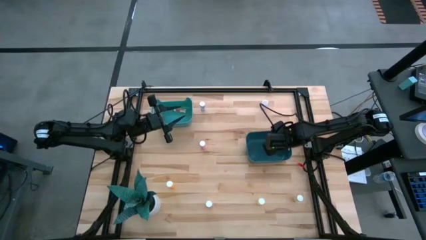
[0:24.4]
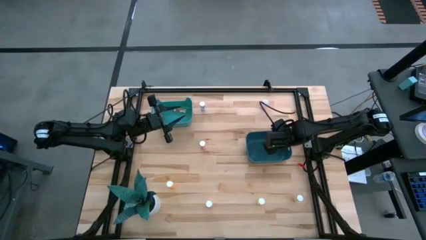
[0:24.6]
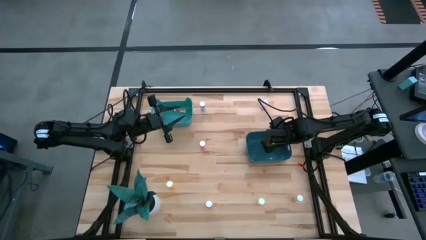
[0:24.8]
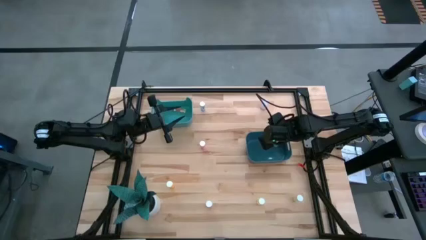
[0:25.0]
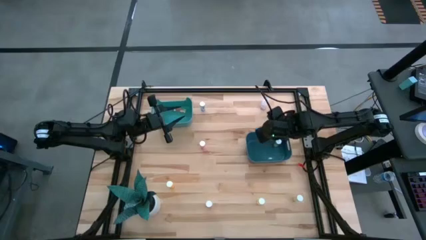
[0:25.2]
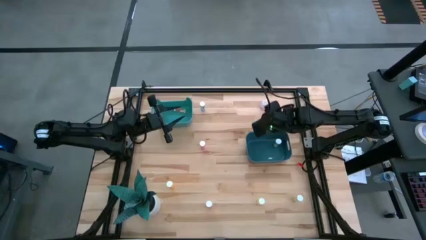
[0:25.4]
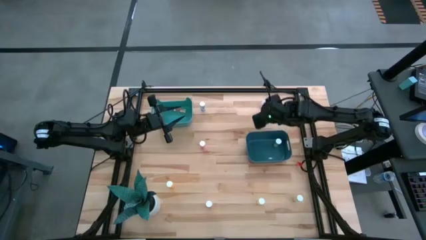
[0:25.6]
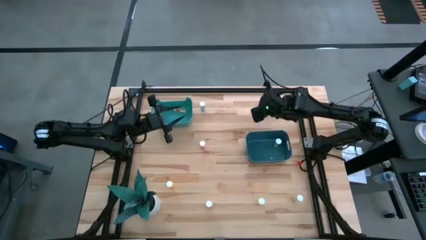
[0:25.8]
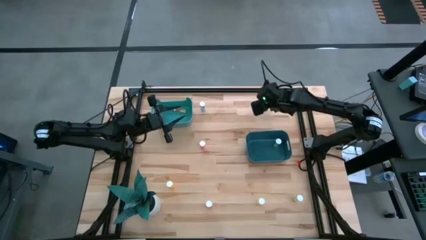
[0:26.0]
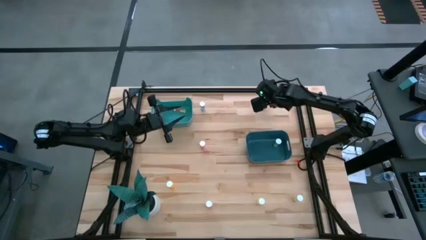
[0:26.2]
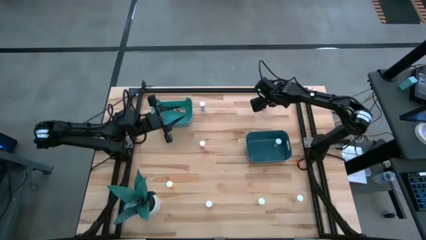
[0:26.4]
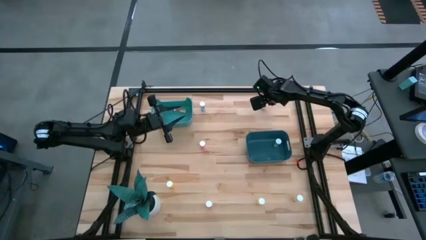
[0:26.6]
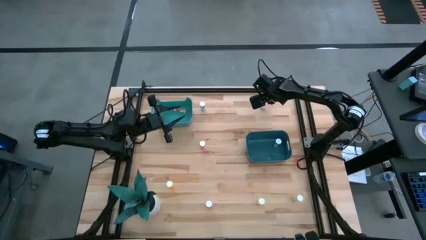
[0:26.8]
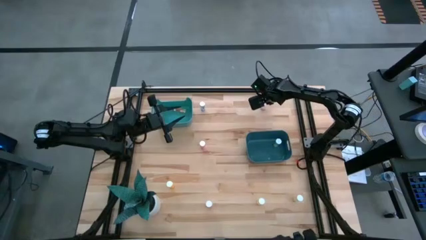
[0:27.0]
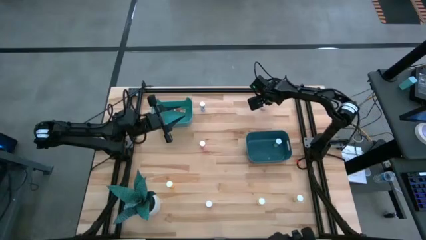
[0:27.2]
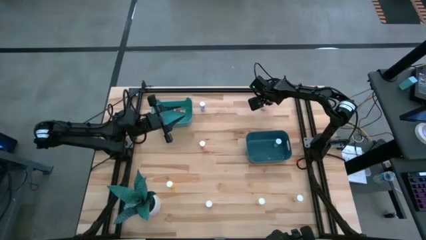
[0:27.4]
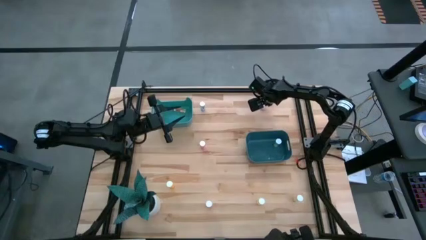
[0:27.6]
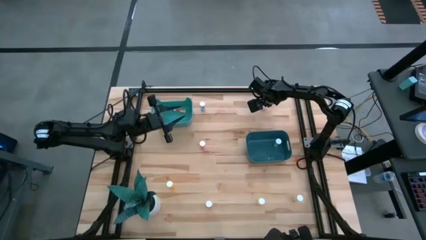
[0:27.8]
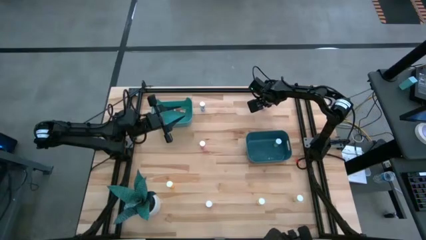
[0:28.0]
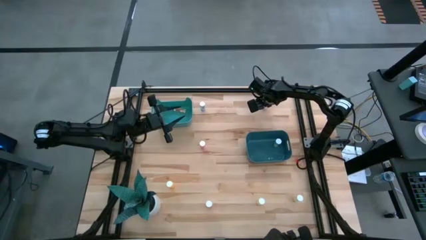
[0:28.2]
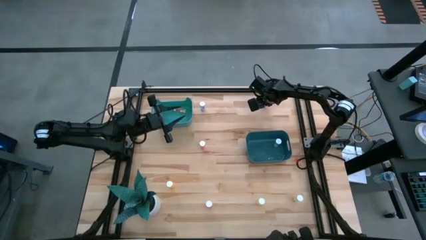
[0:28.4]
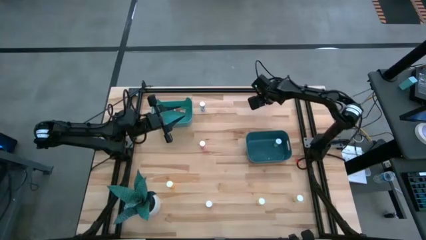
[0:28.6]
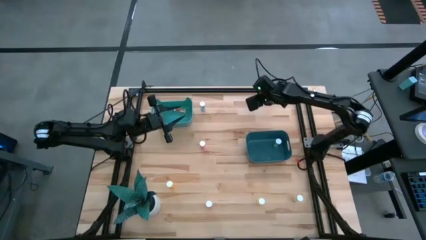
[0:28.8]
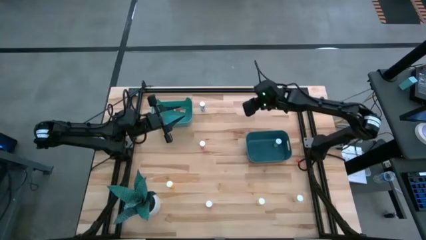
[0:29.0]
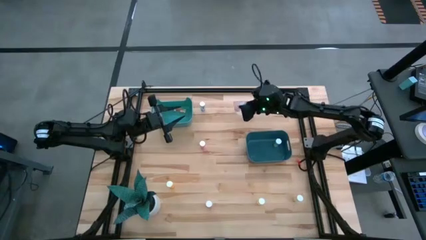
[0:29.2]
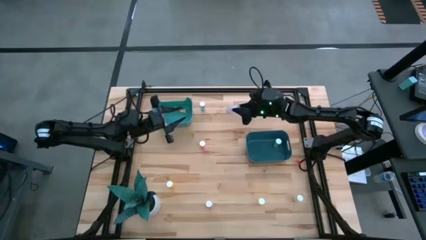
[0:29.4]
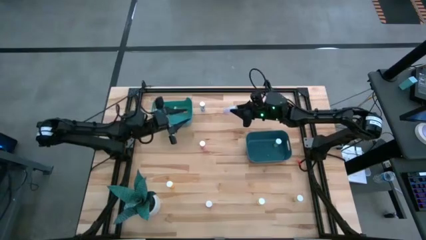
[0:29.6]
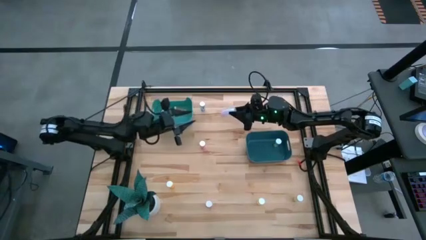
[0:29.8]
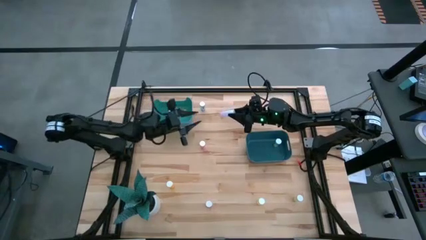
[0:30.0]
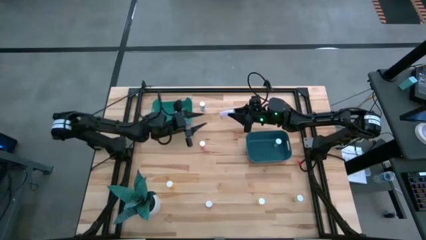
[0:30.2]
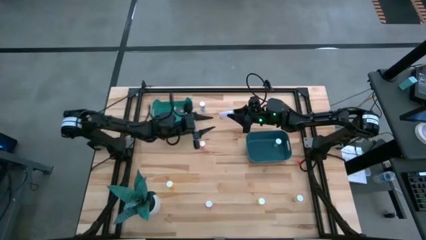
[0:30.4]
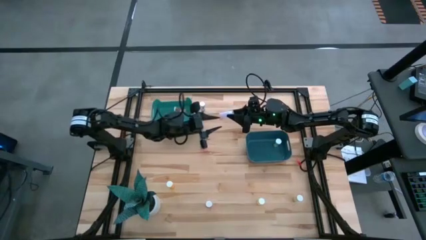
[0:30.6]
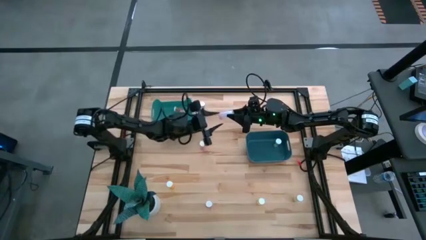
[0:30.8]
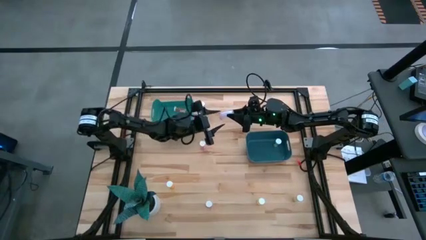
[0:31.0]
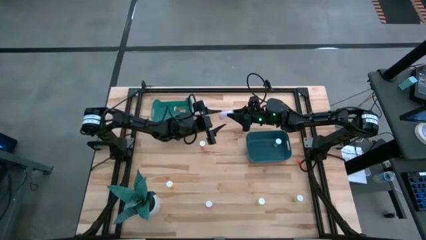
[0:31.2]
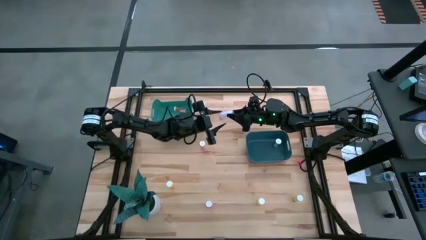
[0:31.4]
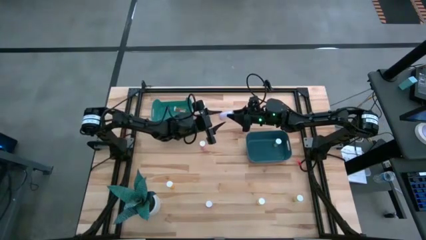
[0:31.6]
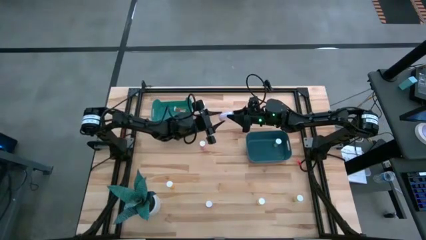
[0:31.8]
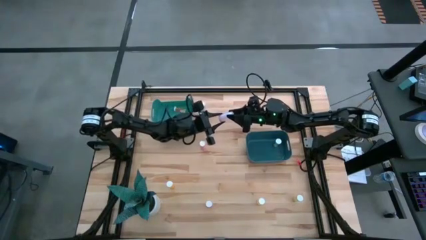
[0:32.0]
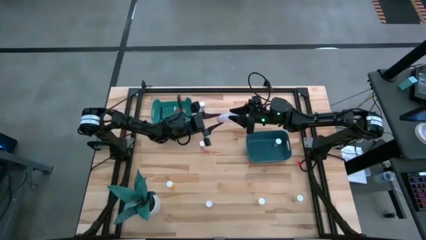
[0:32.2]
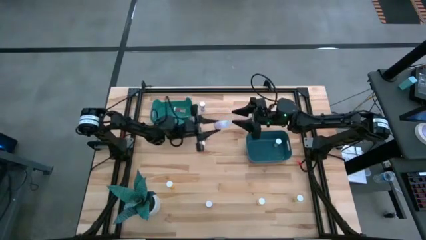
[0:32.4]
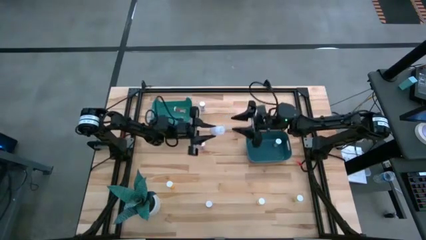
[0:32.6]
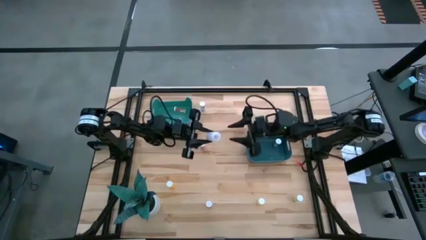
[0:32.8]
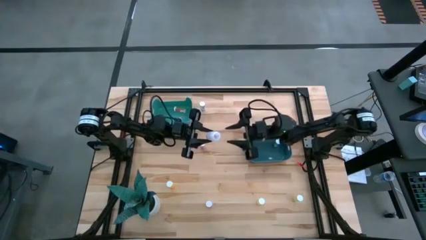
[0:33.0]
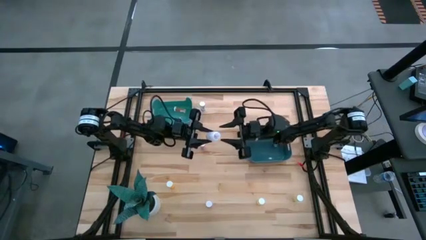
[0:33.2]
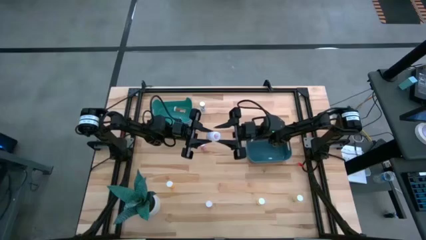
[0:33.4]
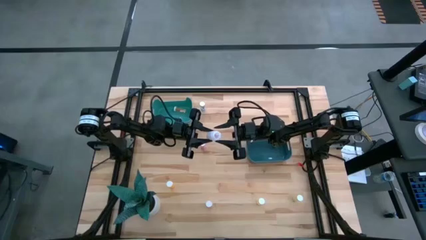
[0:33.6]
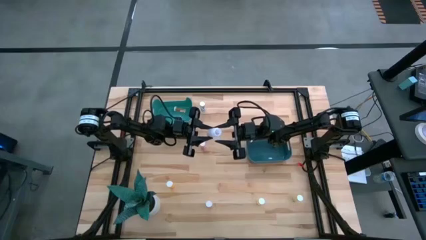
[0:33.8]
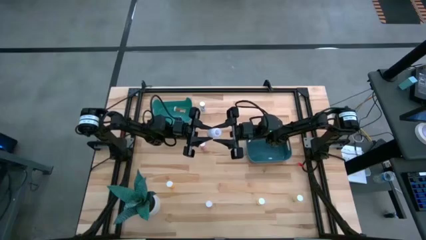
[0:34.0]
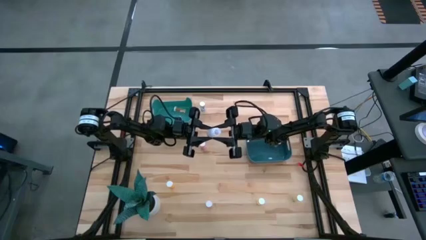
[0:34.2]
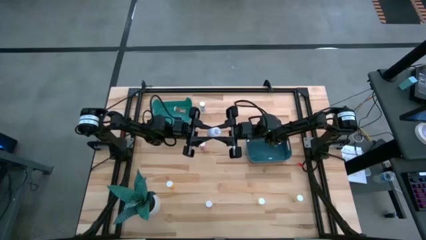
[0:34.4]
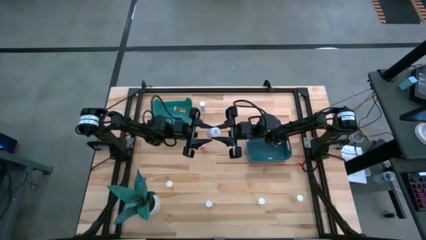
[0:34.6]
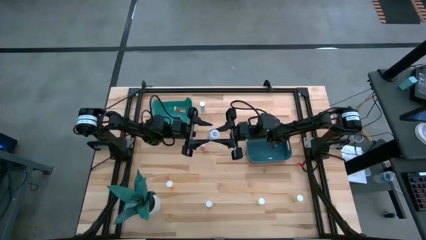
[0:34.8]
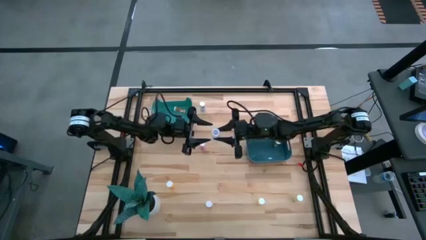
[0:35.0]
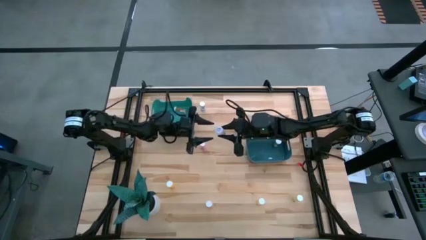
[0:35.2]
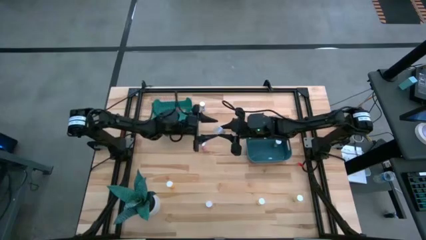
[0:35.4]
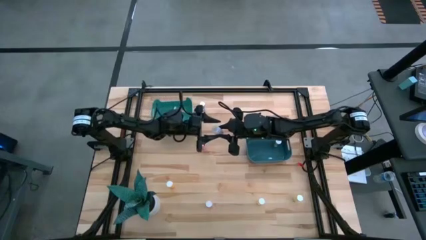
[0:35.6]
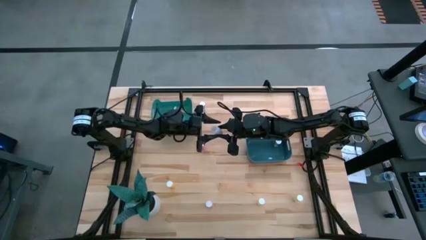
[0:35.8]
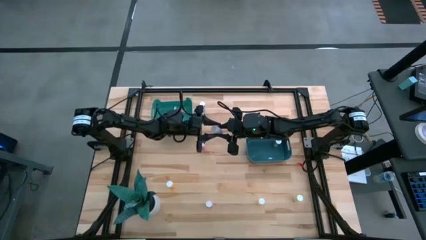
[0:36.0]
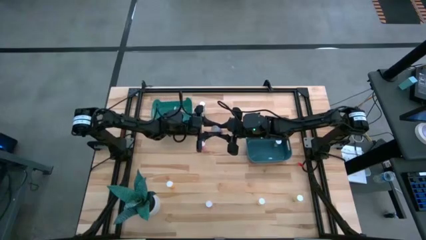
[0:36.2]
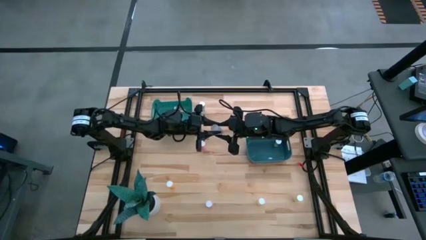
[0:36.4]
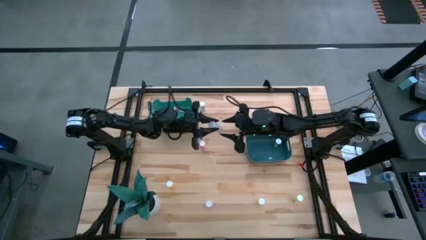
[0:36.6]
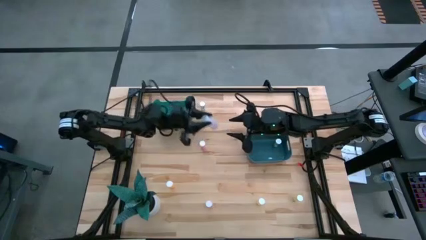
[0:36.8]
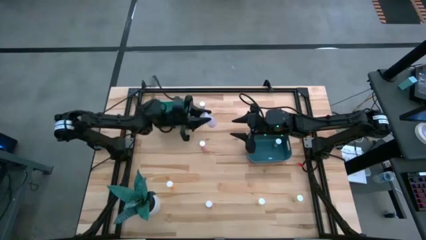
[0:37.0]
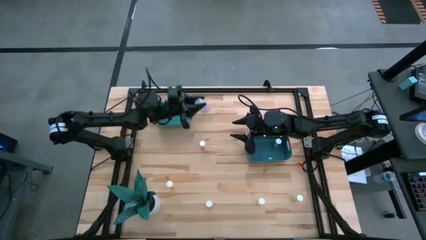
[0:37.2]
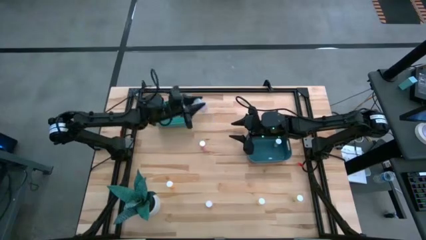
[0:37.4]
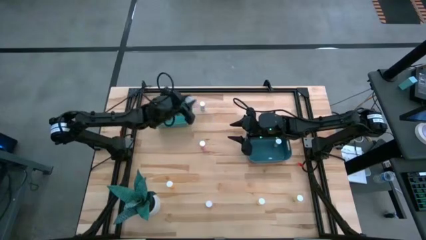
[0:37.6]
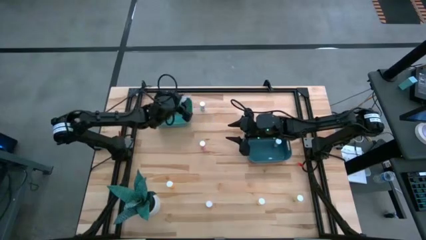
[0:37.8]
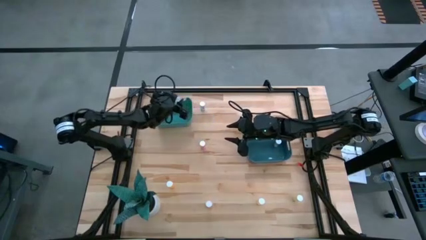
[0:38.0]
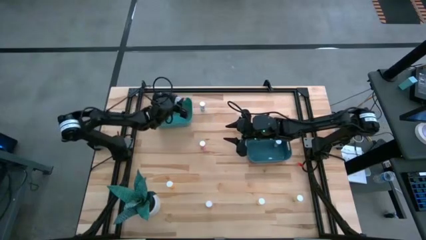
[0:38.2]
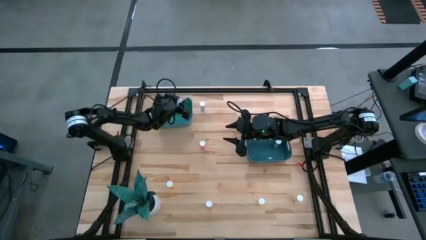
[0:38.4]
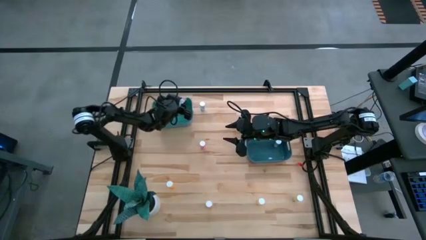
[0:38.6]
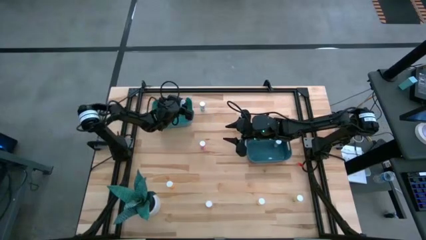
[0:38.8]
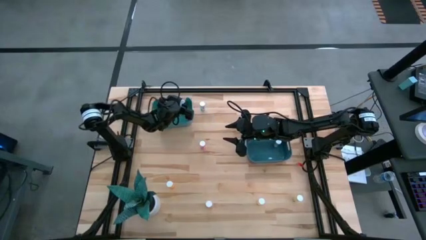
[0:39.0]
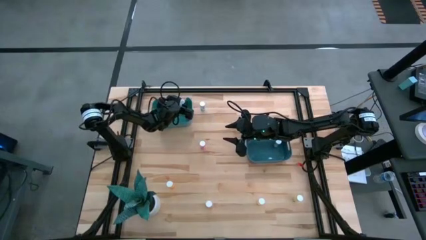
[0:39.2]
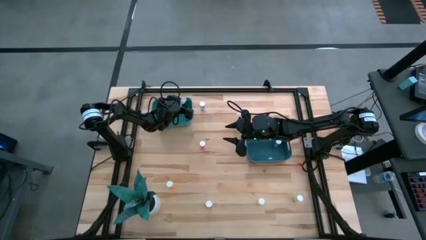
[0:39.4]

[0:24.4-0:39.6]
Task: Pick and place medicine bottles into bin by pill shape (circle, oval)
Put the transparent capsule bottle into the green bin
